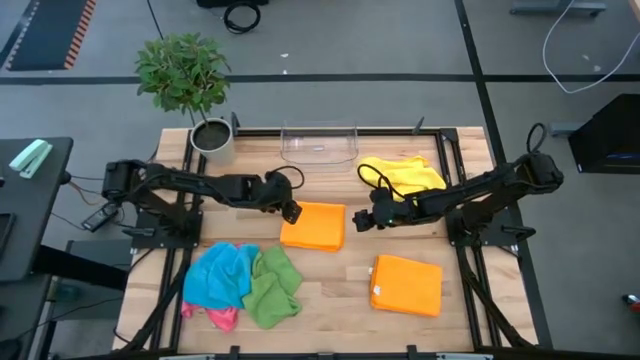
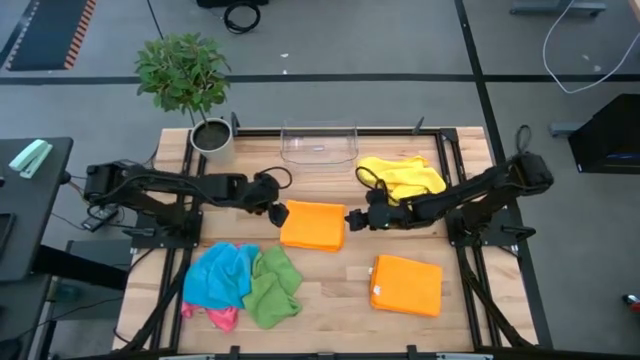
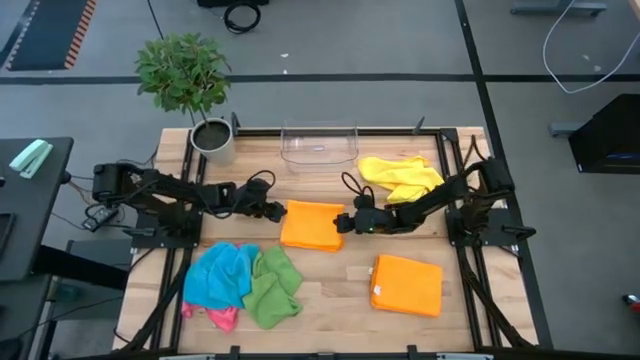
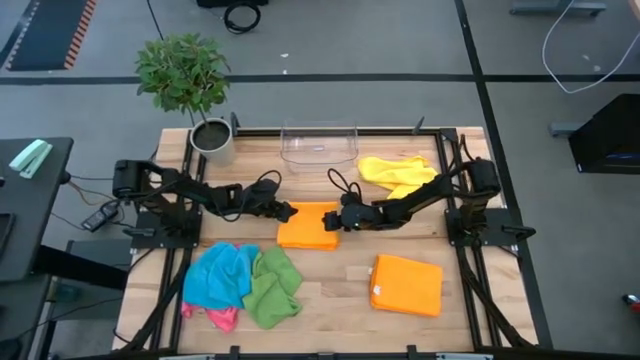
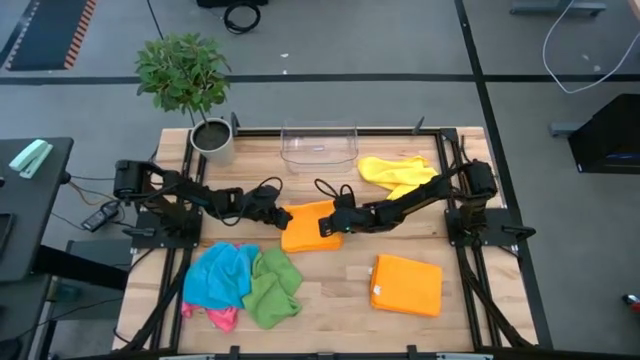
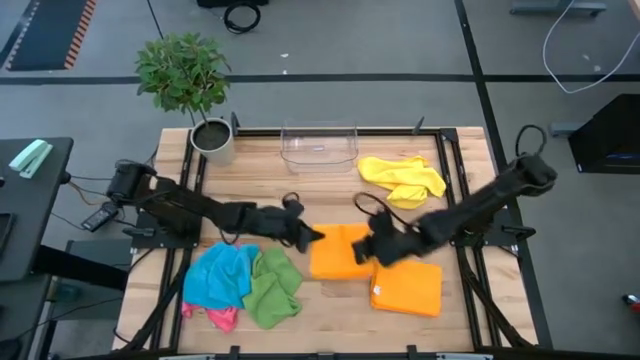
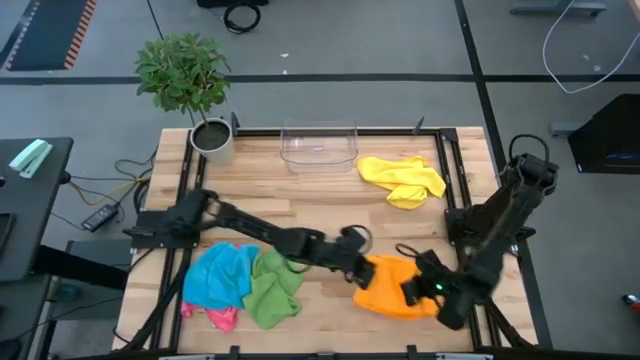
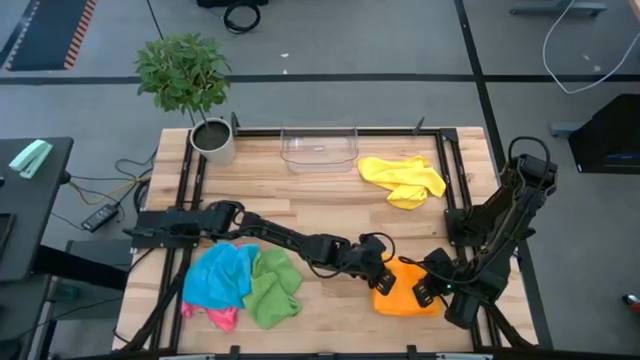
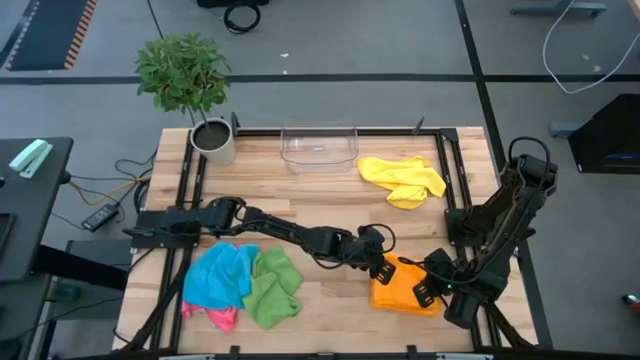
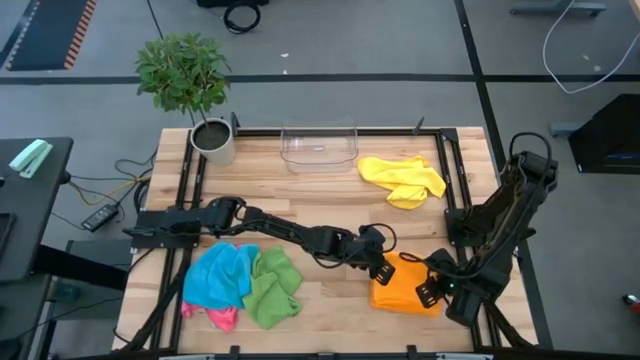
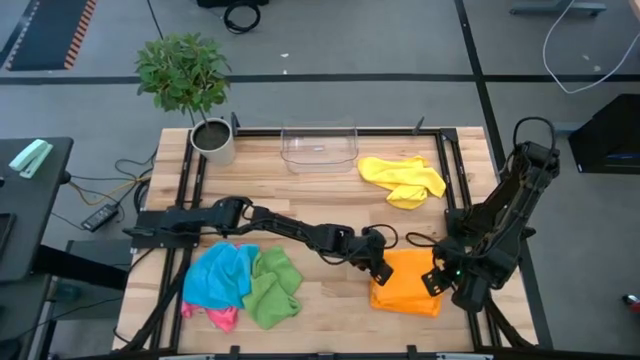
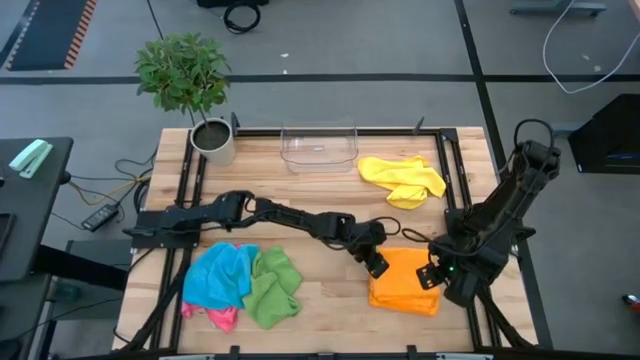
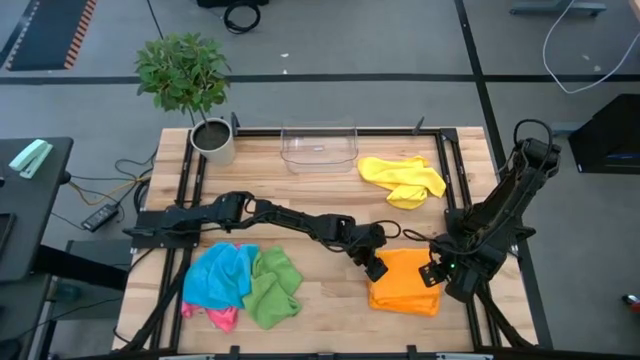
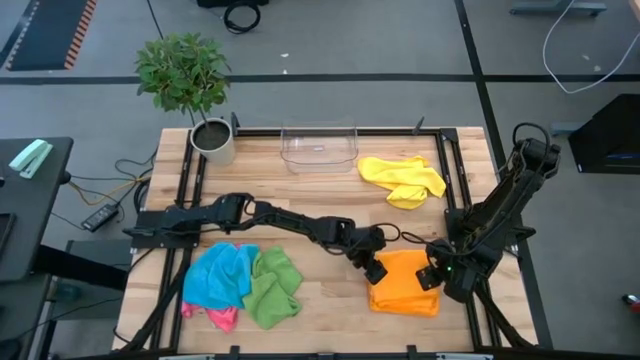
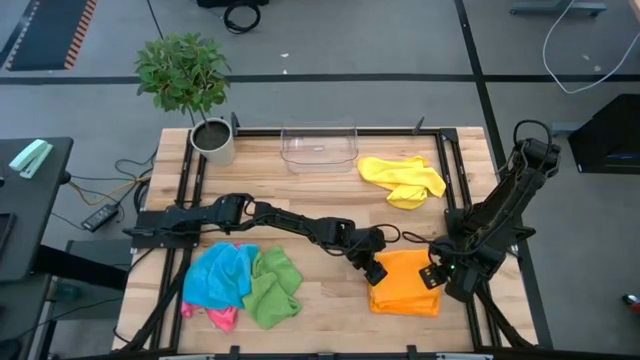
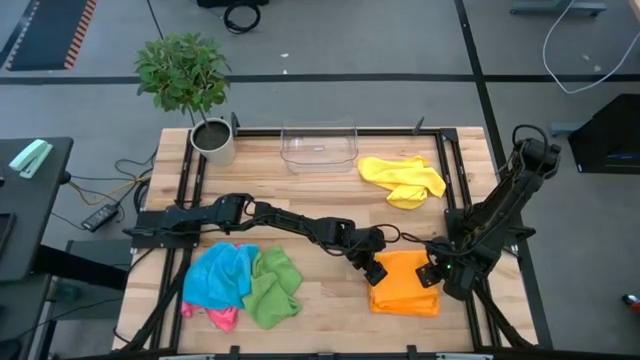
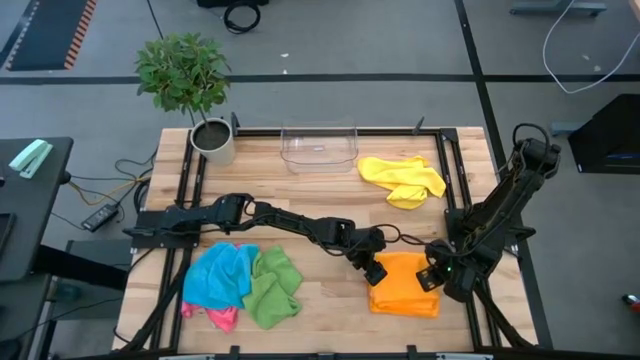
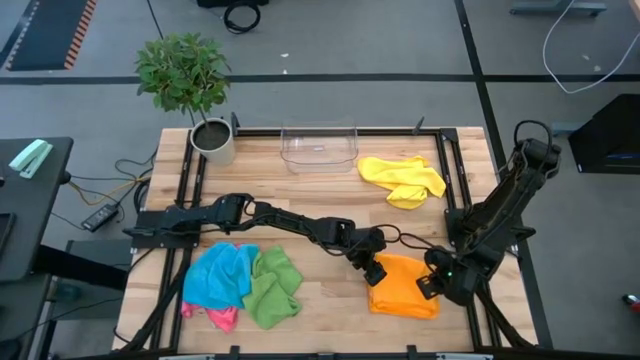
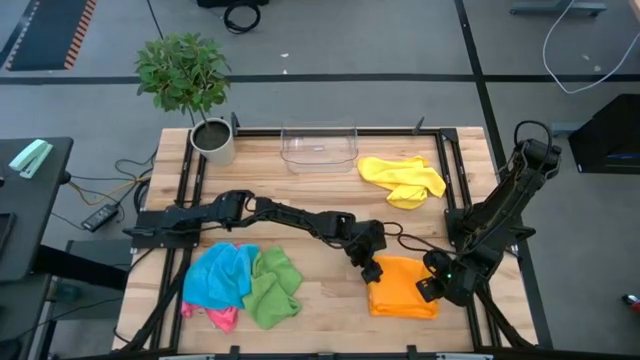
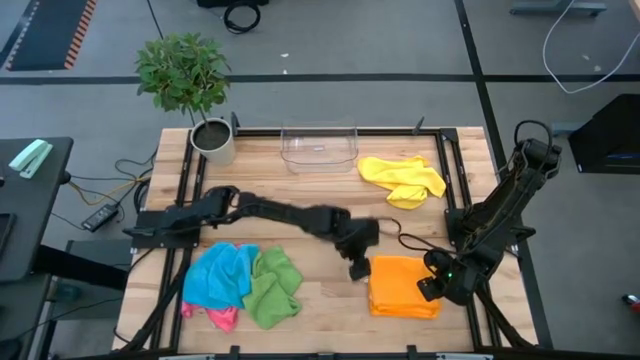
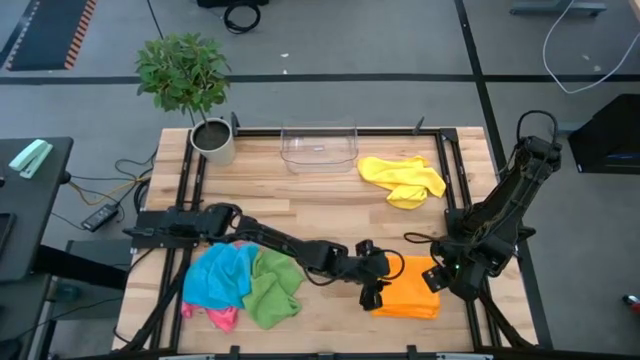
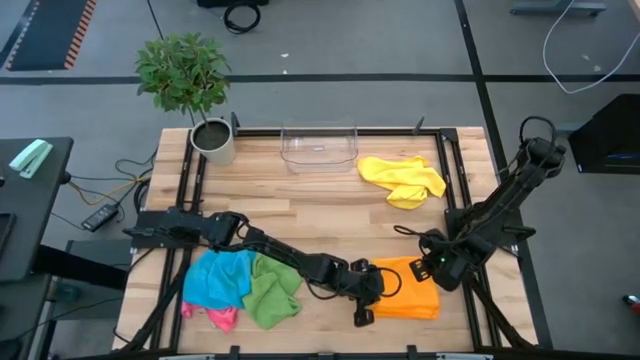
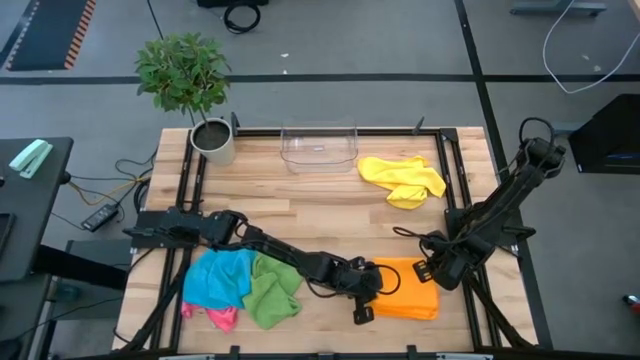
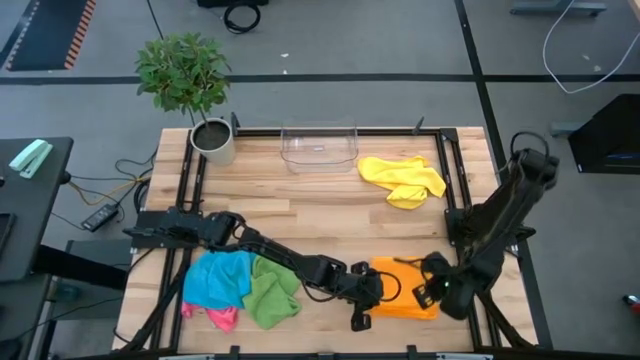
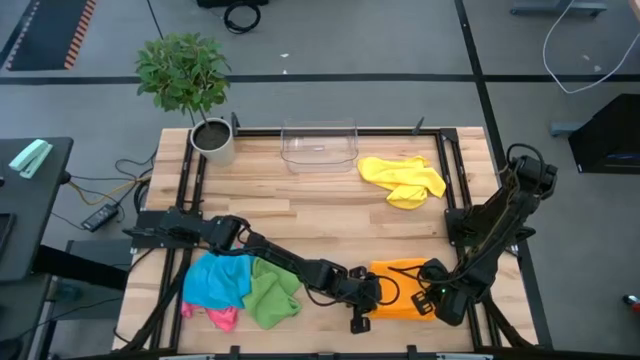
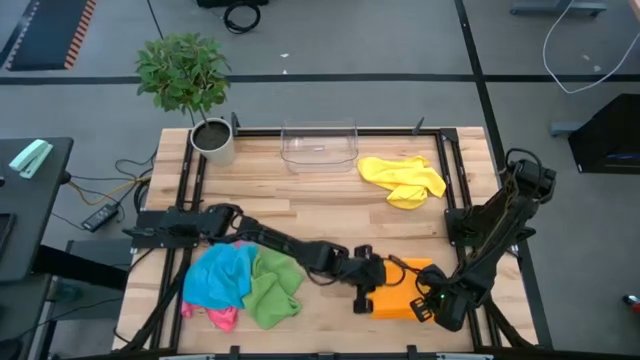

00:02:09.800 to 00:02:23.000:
Task: Fold microfiber towels
Stack the orange towel on the bottom orange towel

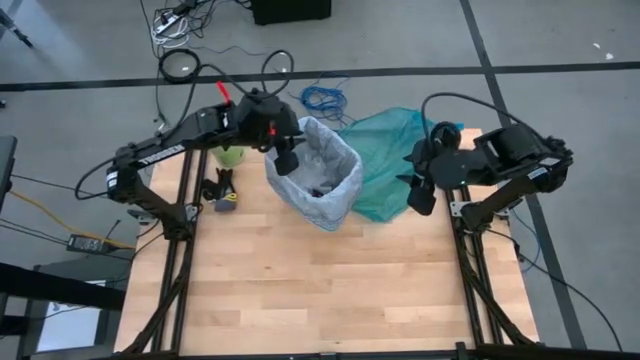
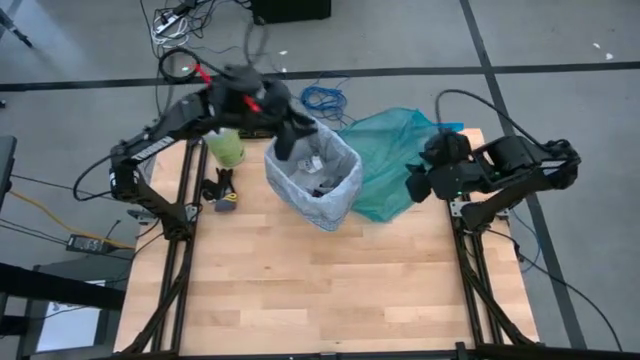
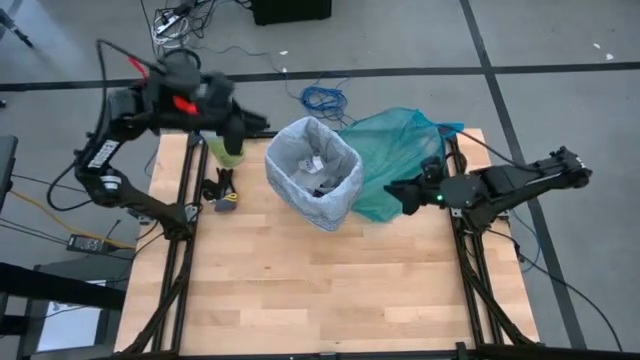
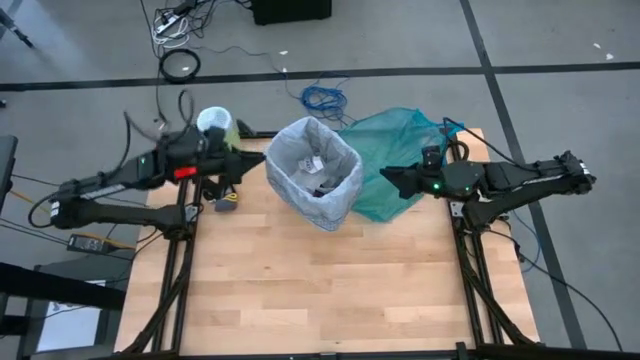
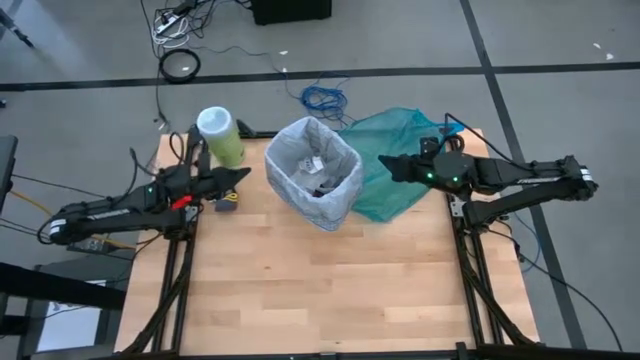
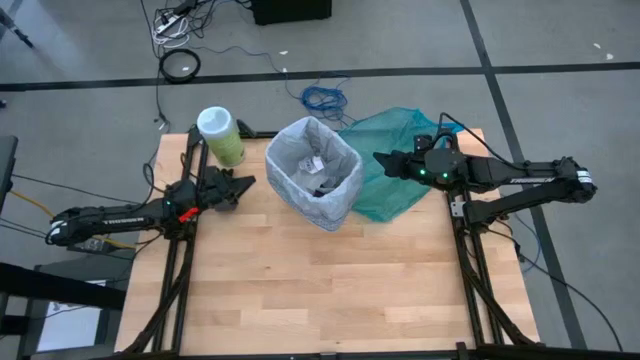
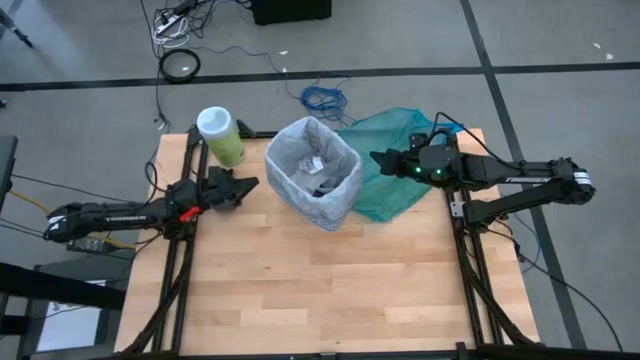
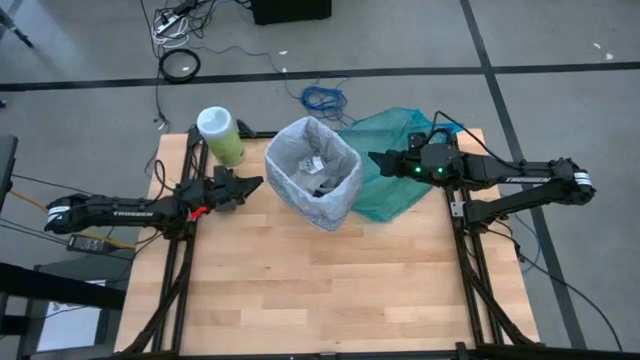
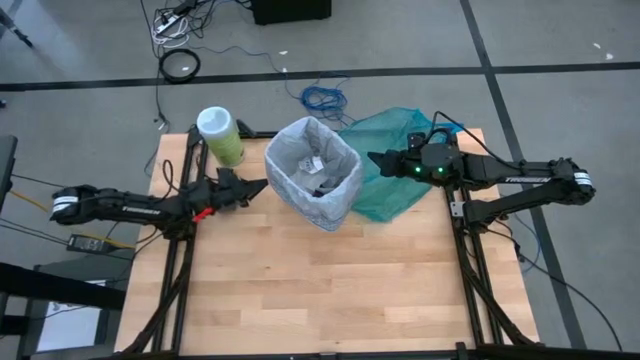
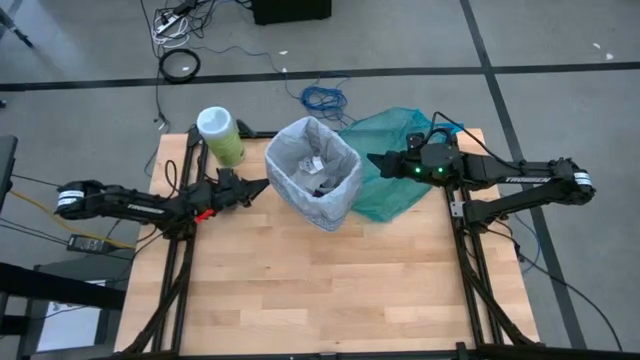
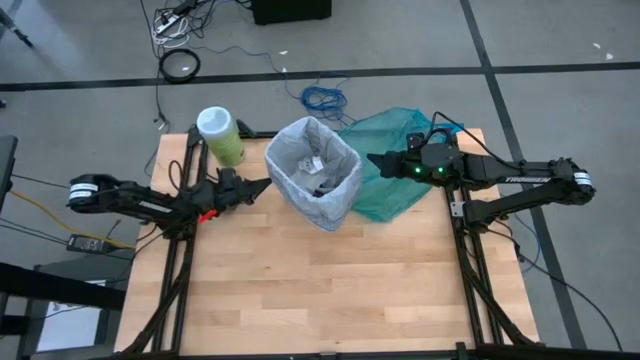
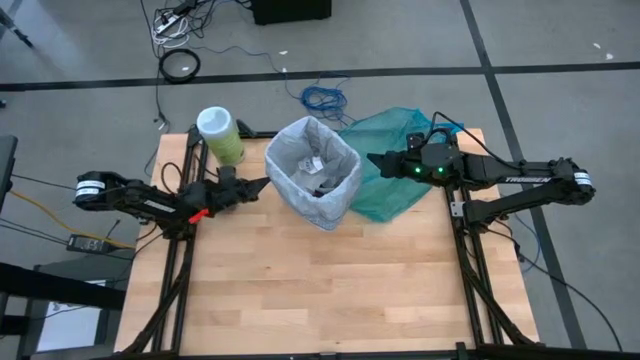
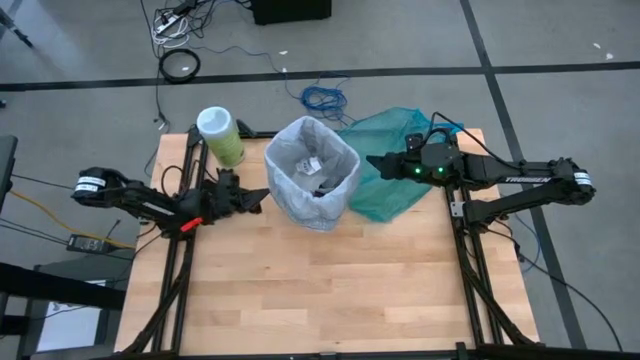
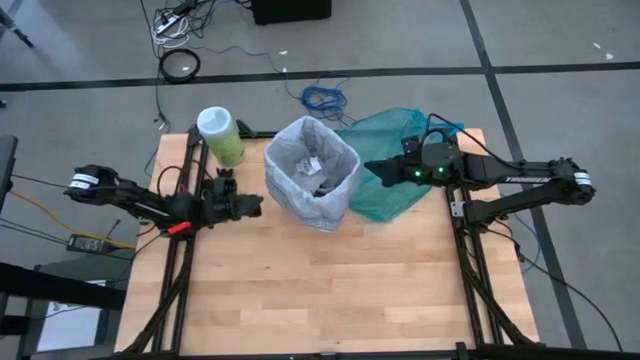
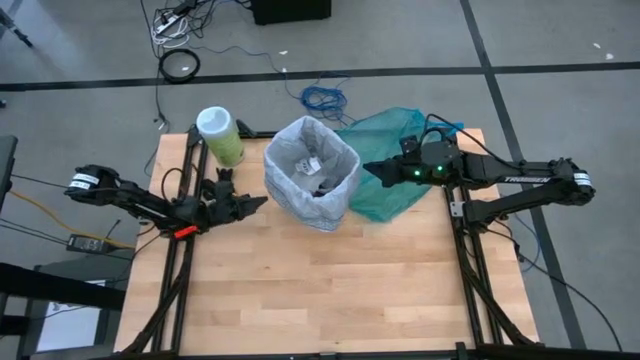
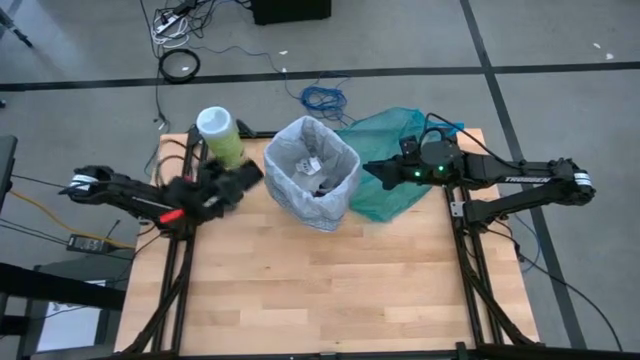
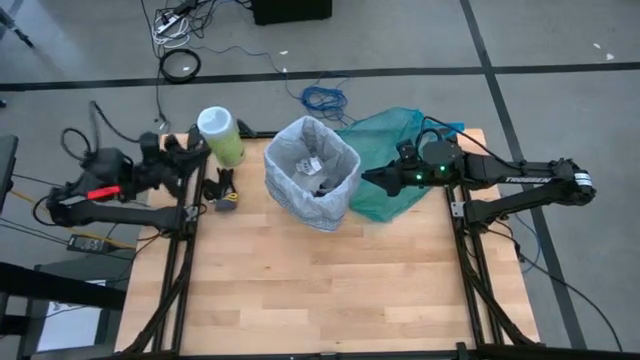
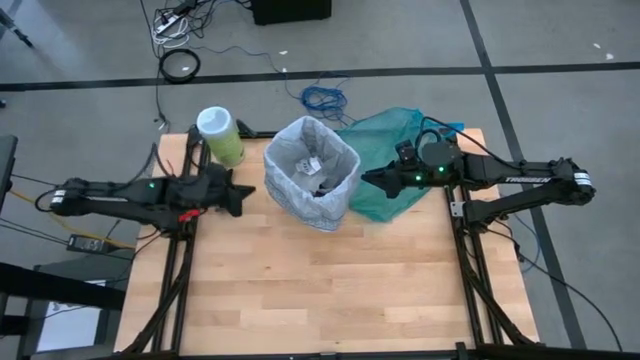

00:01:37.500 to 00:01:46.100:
Task: place trash/remove bag and relplace
Remove the light blue trash bag from the trash bin
